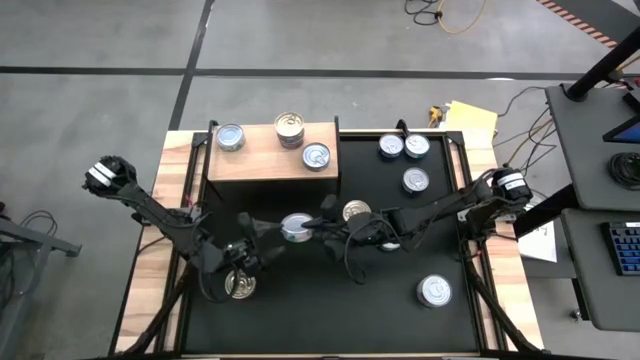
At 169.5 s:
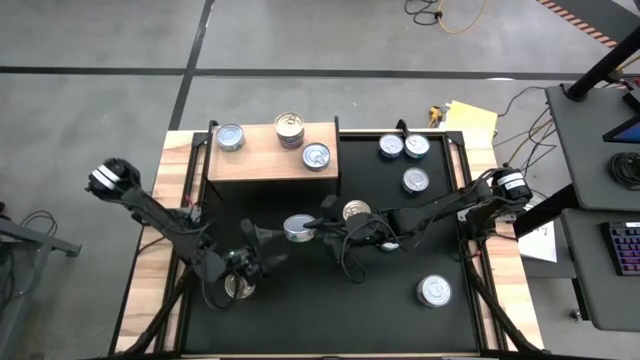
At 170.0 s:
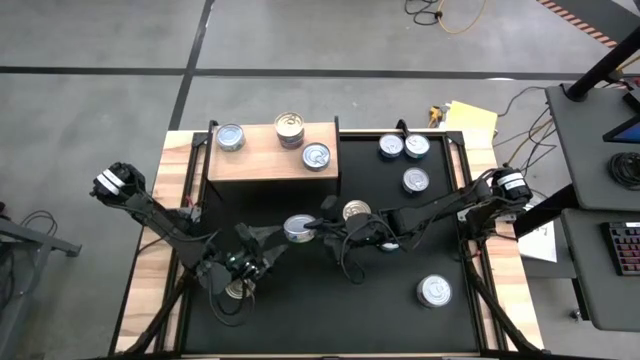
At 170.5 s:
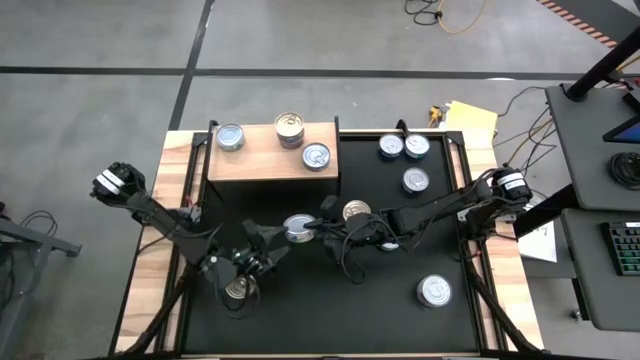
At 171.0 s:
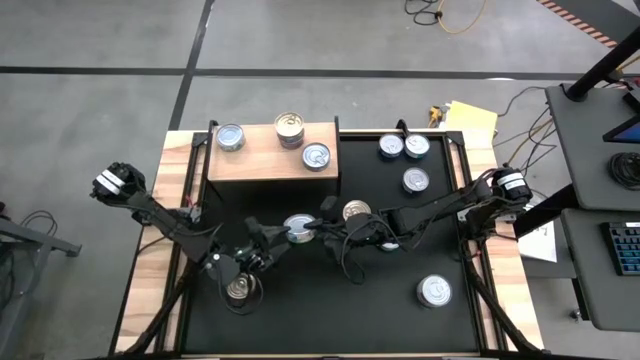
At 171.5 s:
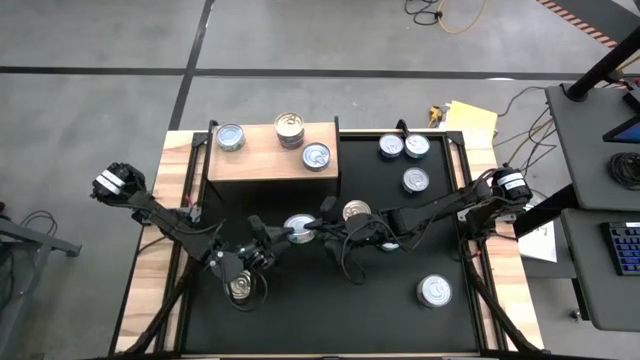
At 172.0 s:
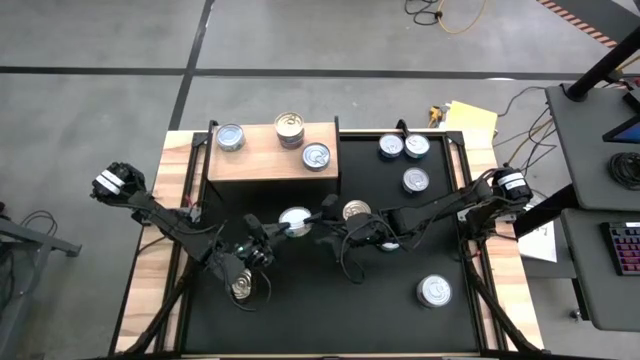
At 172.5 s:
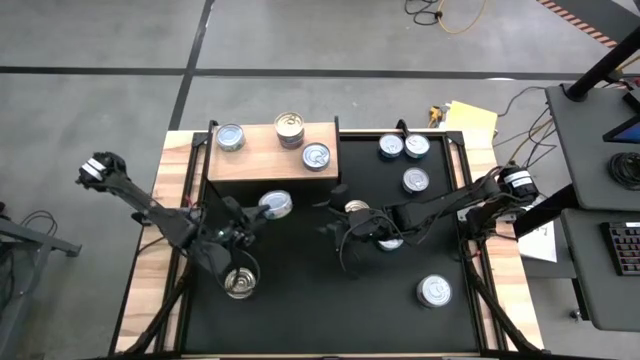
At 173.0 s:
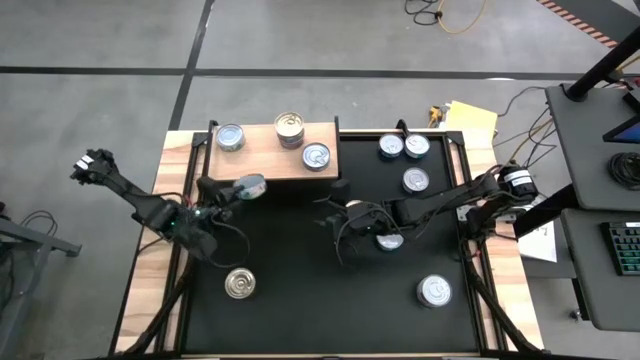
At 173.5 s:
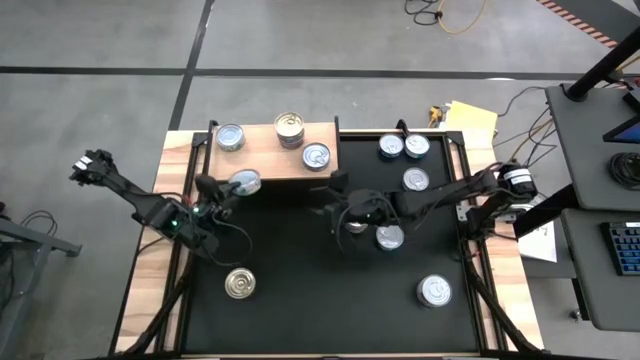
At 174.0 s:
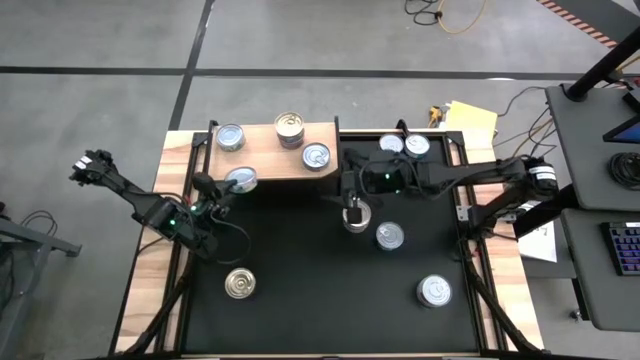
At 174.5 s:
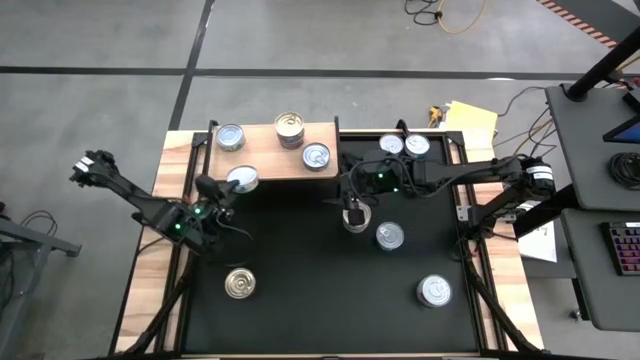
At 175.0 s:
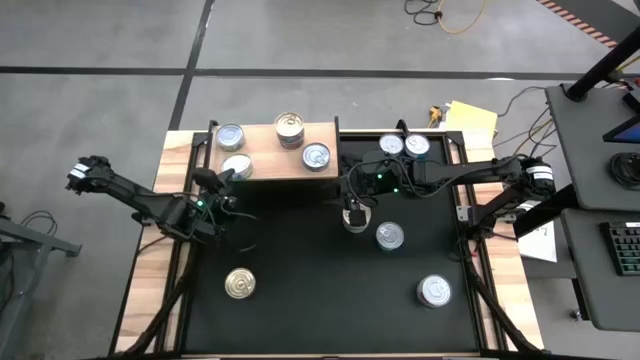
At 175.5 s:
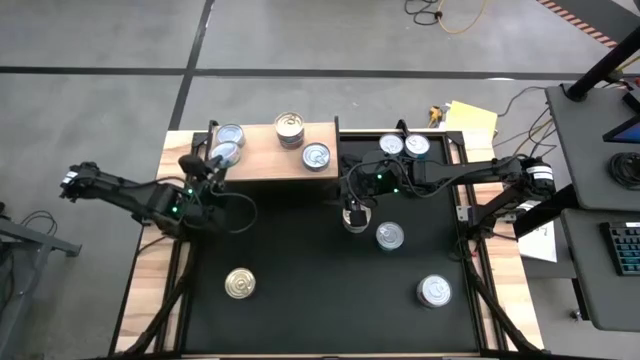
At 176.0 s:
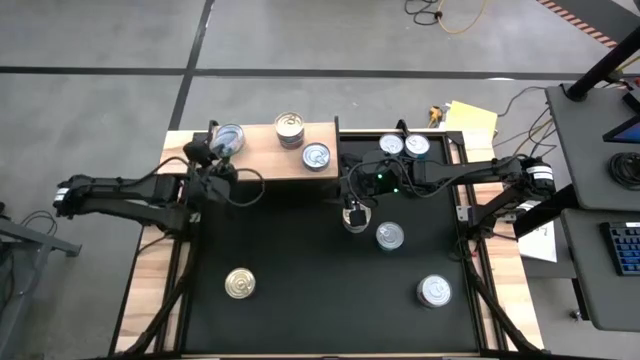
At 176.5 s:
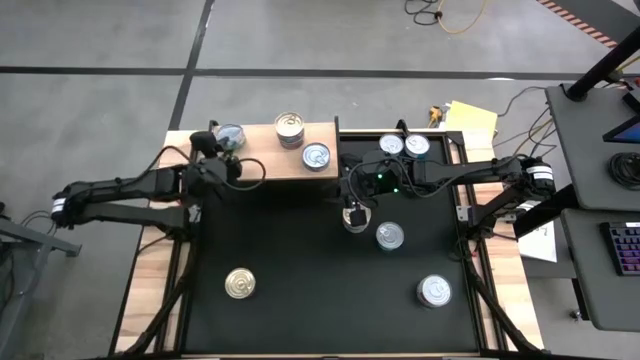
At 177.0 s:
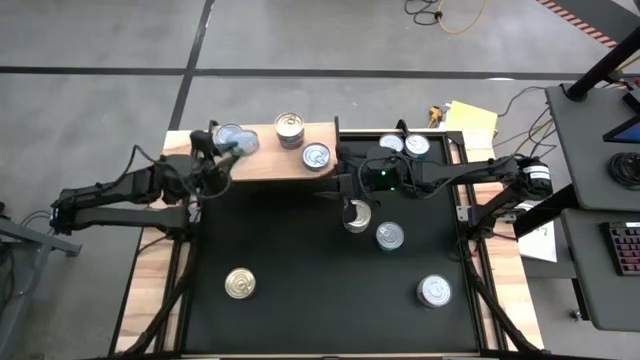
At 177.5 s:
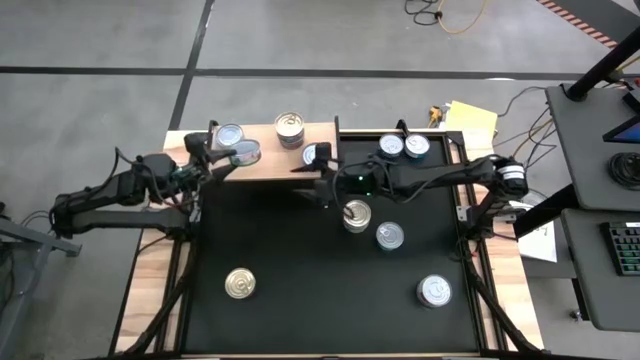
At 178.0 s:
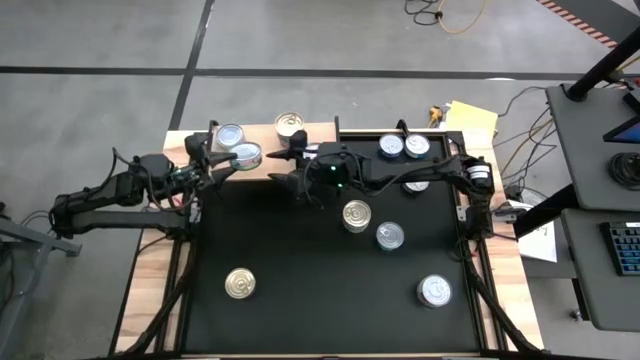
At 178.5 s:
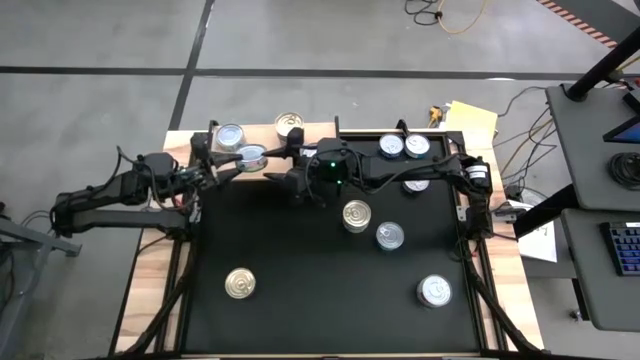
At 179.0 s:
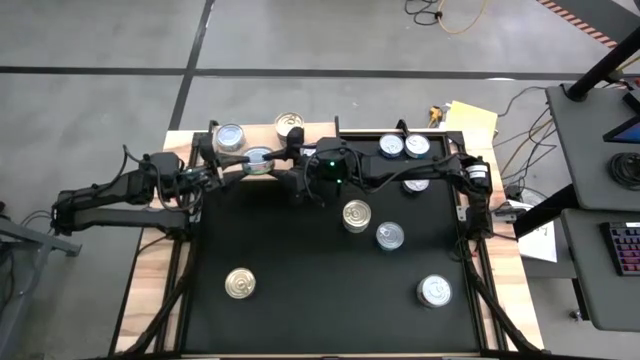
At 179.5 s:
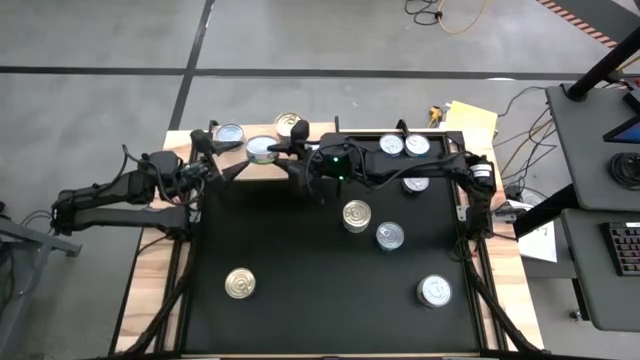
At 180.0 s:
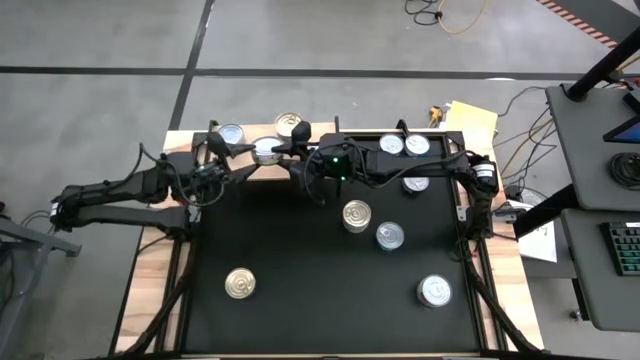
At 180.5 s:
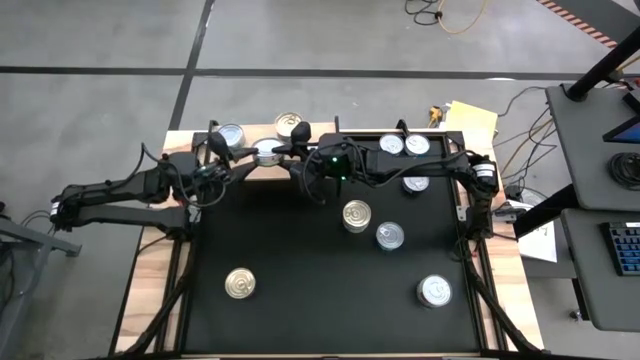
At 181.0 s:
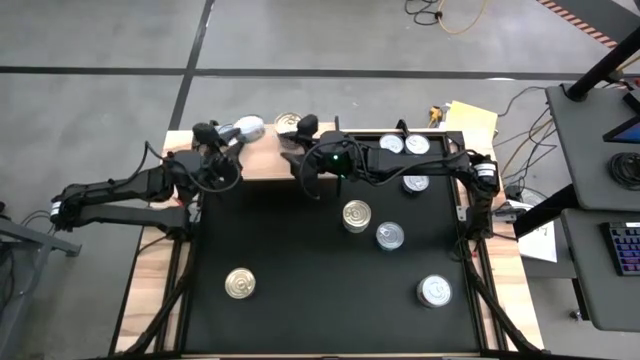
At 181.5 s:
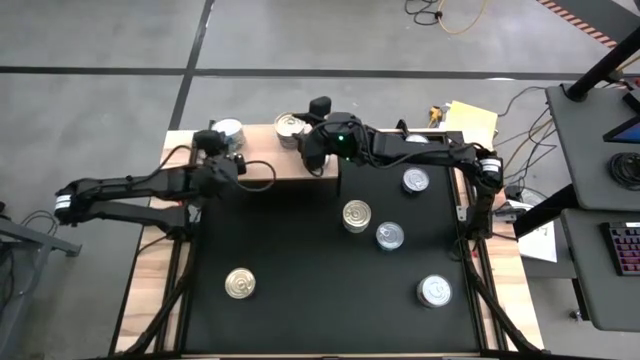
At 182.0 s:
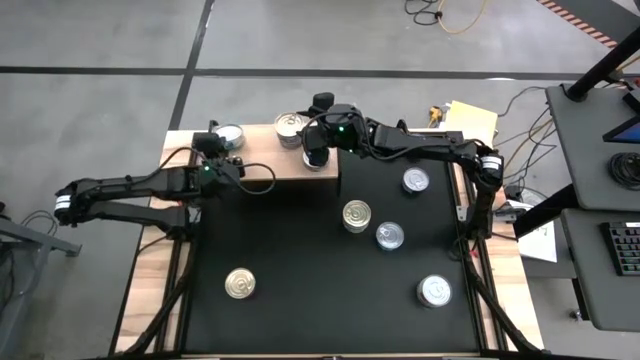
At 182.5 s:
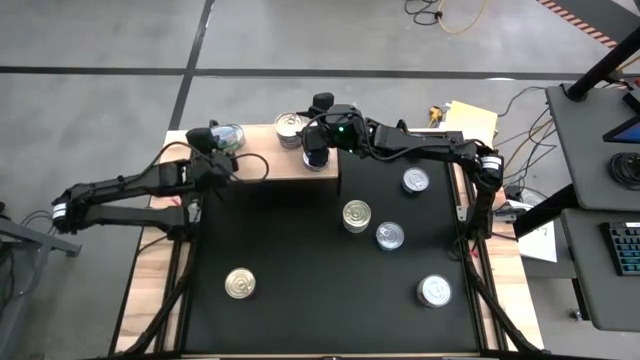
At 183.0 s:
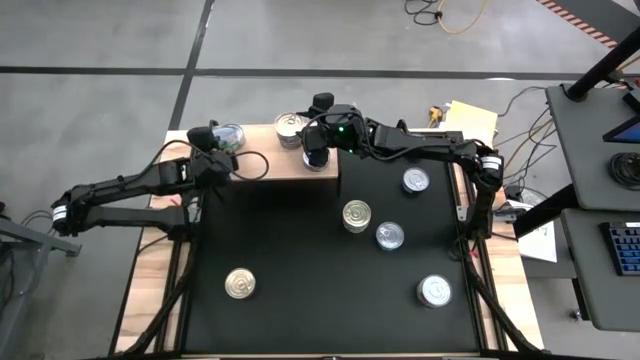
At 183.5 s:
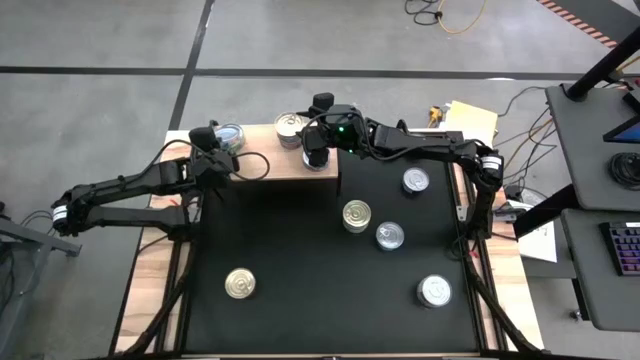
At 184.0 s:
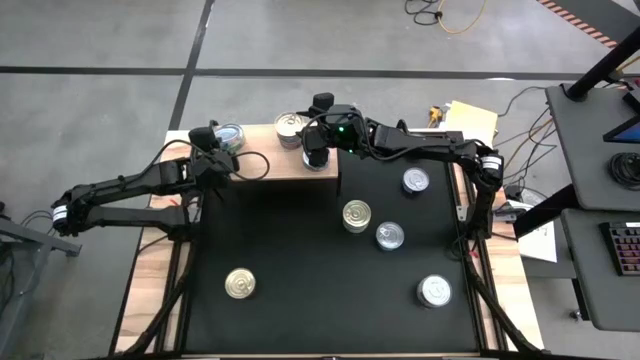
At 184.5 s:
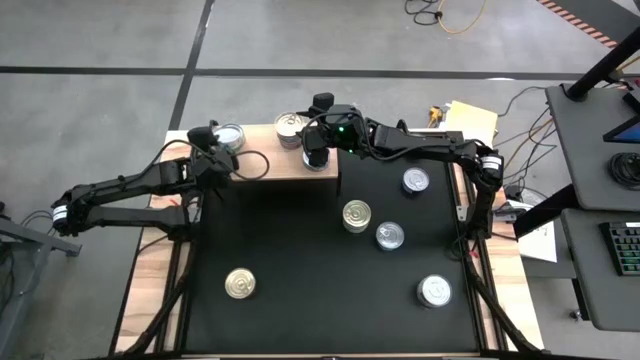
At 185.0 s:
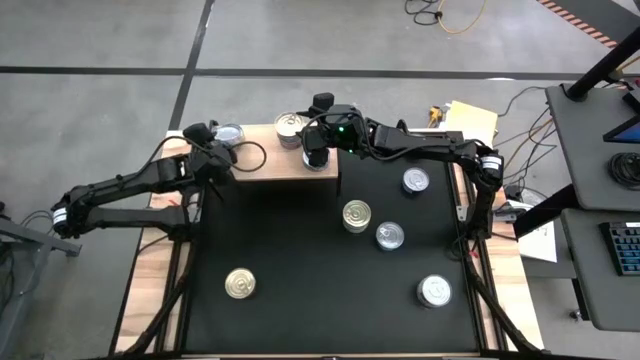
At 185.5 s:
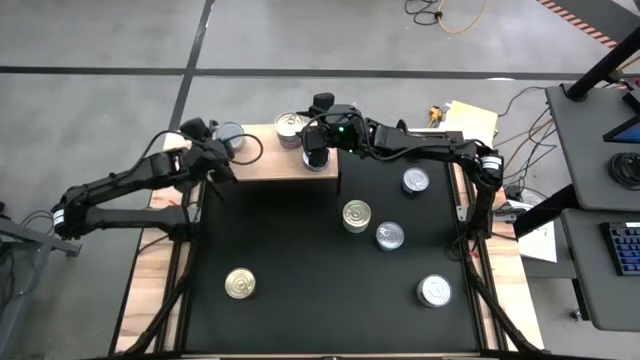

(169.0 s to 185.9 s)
Task: Stack canned seafood by type on shelf
Stack the green/white tuna can on top of the other green/white tuna can on the shelf

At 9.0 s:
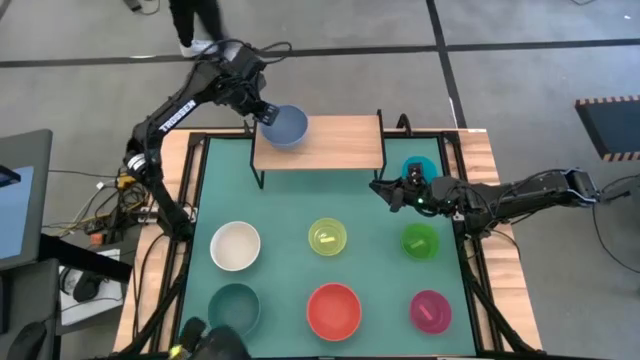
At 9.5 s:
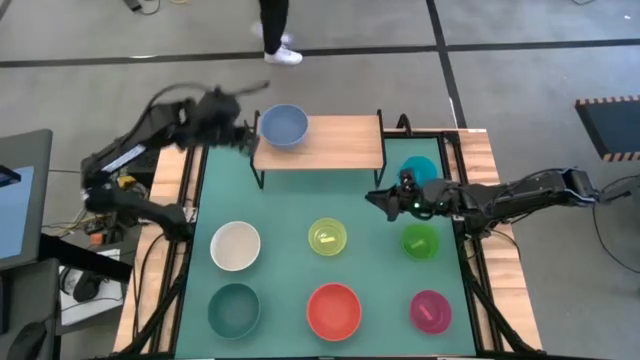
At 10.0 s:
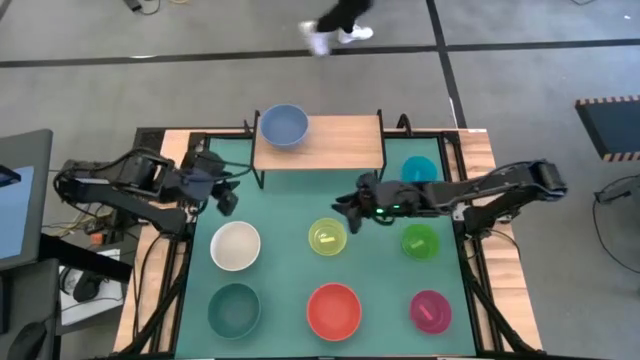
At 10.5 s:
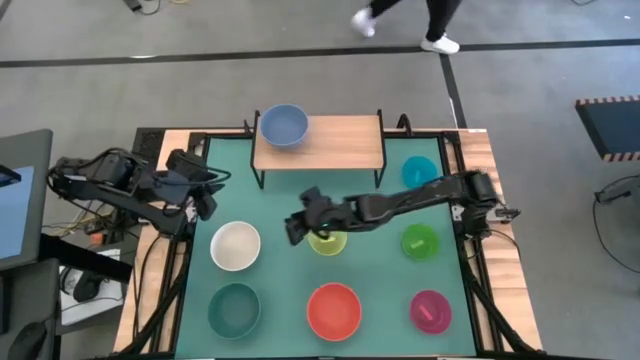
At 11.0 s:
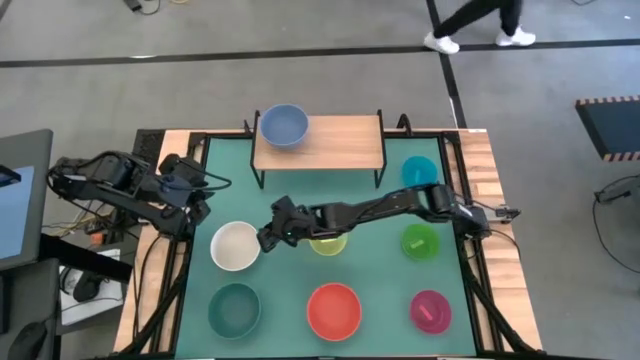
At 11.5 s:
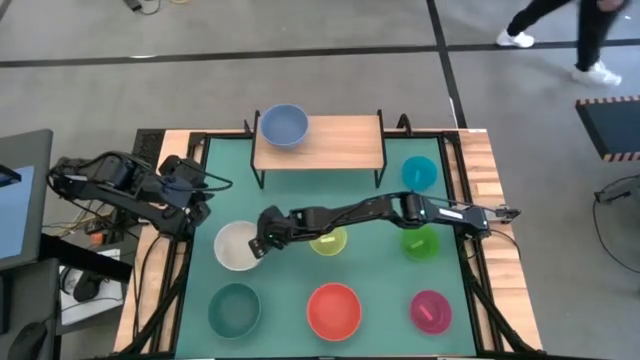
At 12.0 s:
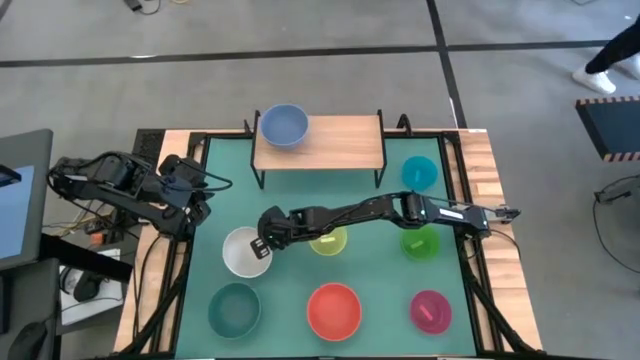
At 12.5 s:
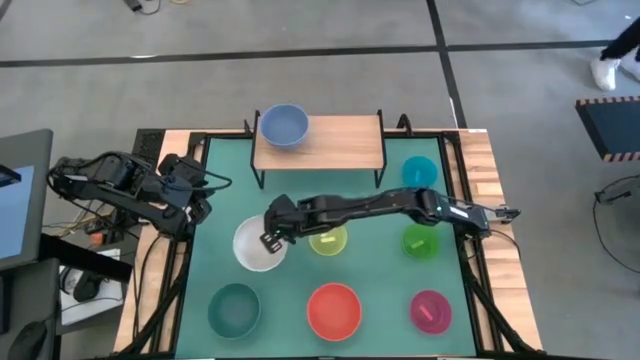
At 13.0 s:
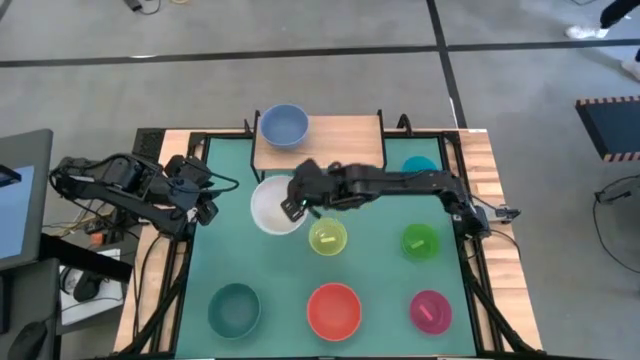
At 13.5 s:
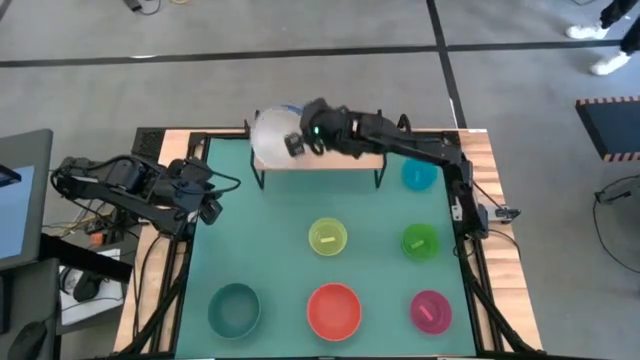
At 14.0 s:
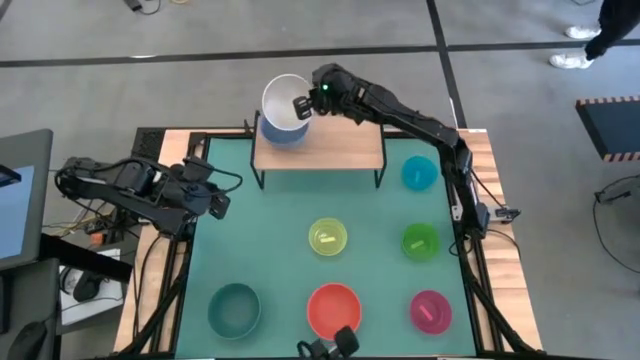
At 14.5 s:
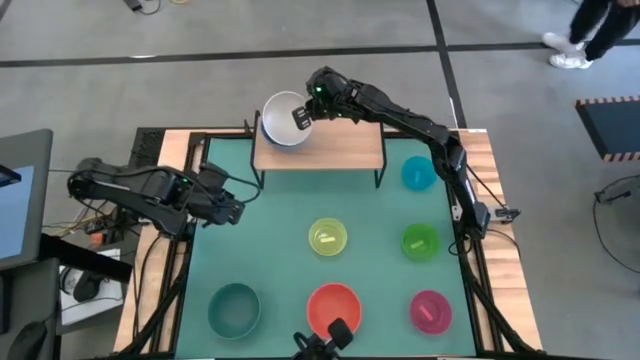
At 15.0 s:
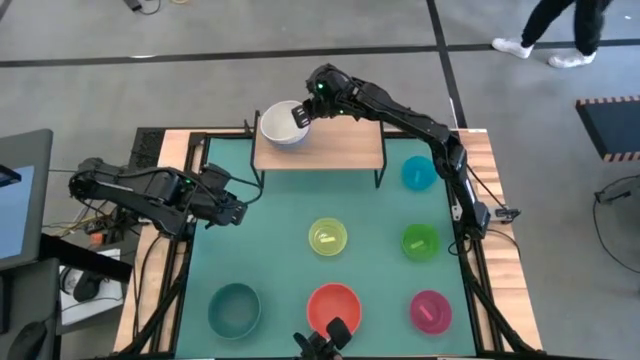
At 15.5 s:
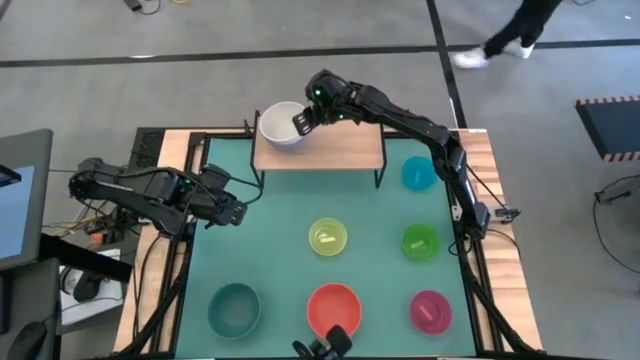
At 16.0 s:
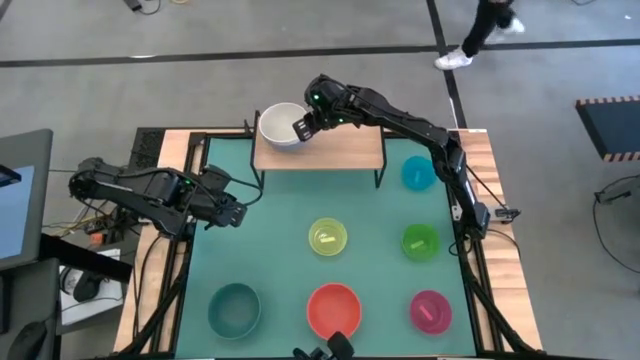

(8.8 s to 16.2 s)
Task: Place and stack bowls onto a shelf
Stack the white bowl on top of the blue bowl on the shelf
